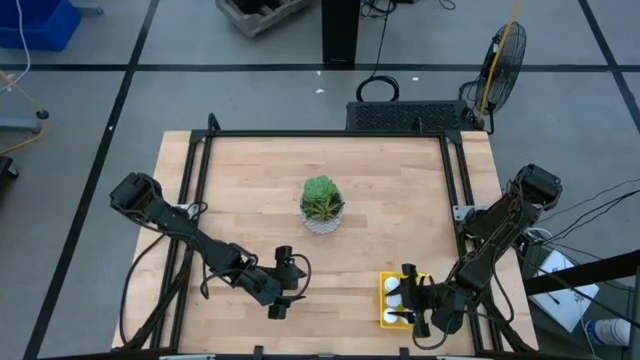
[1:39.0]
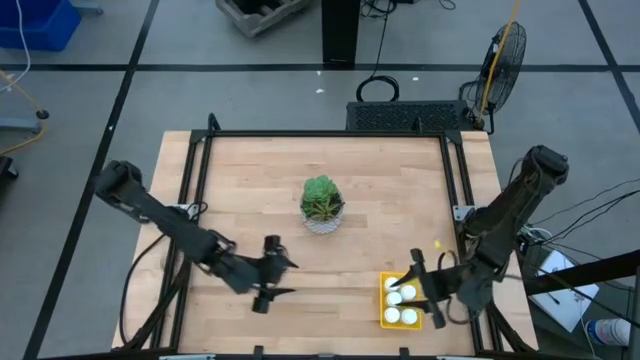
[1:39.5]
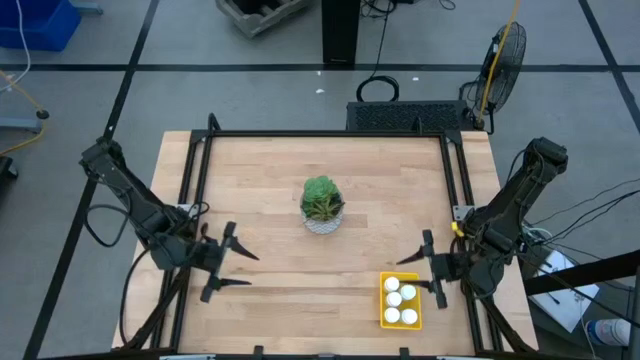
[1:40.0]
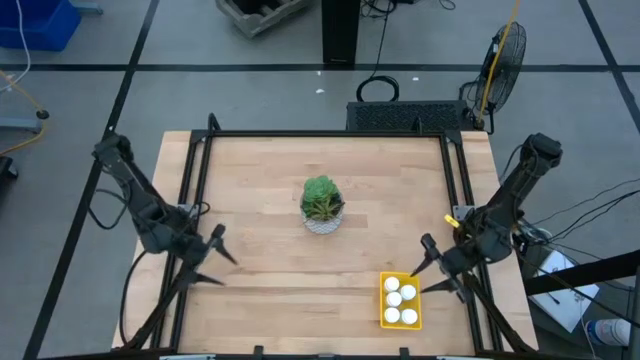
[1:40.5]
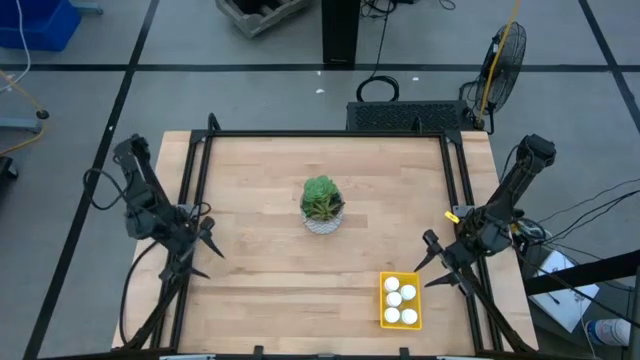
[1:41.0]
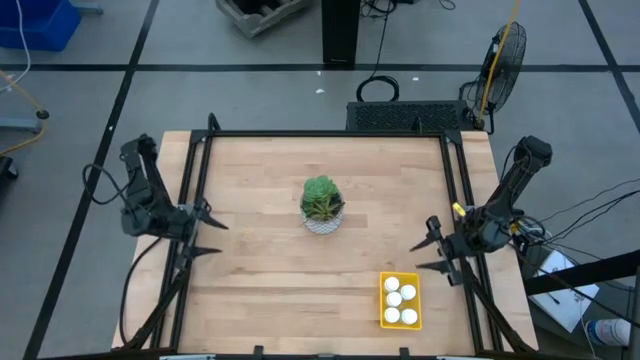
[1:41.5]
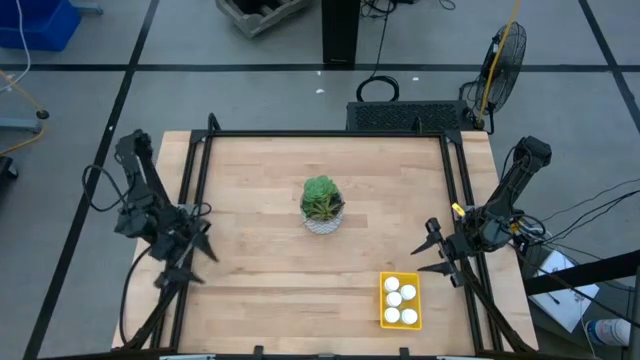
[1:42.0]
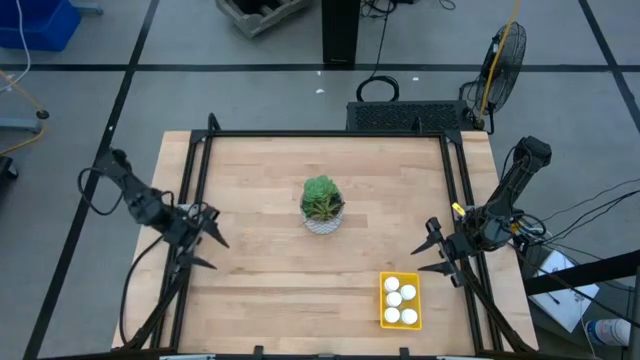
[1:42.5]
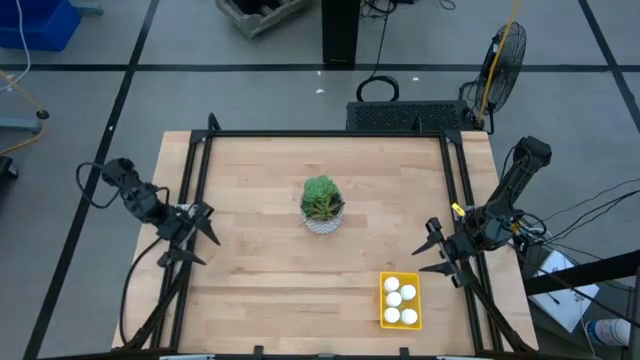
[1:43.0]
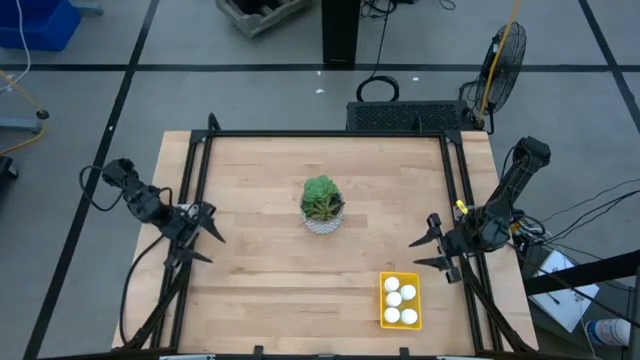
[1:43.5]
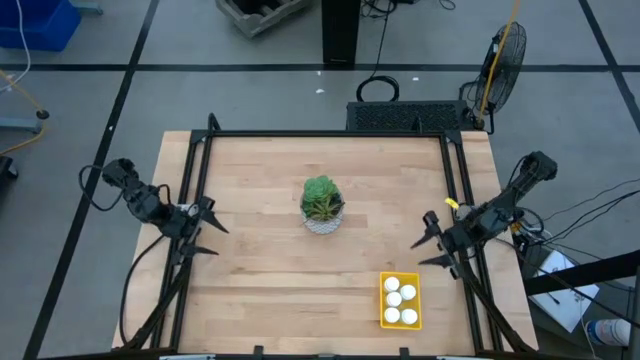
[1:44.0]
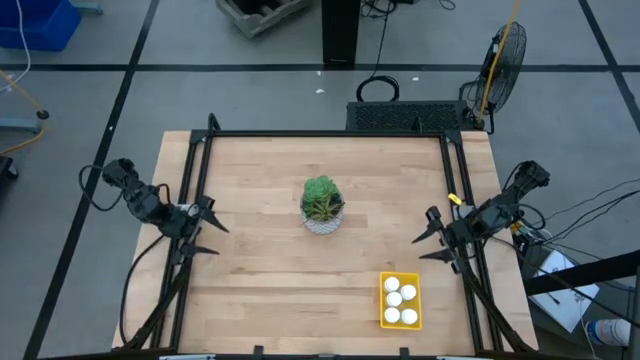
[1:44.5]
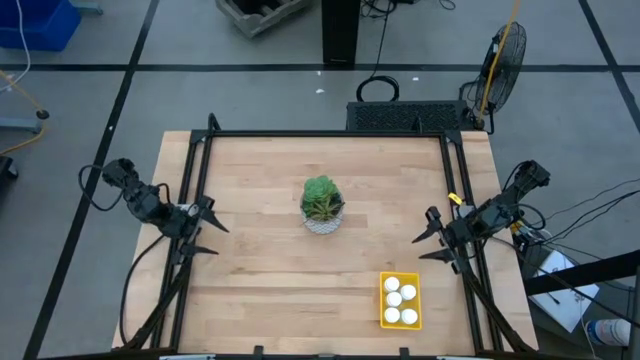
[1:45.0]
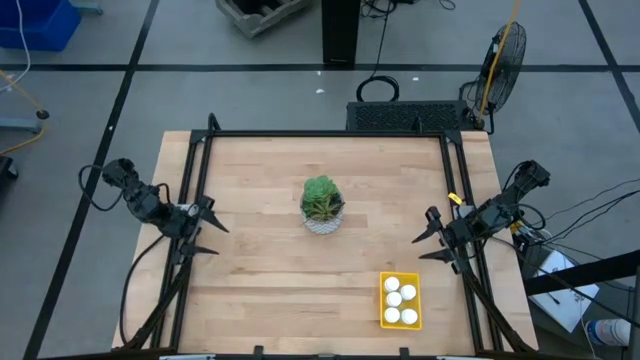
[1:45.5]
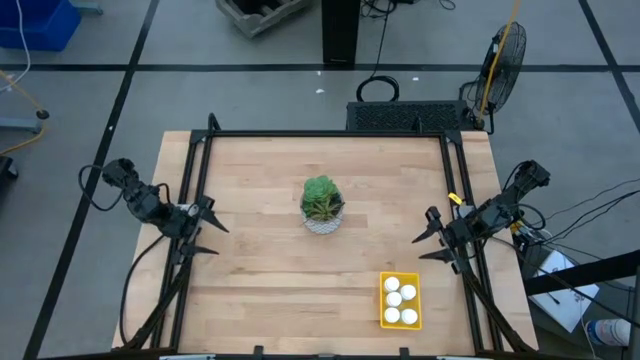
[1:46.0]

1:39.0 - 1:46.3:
Task: Pick and place pill bottles into a basket
Return to Home Position

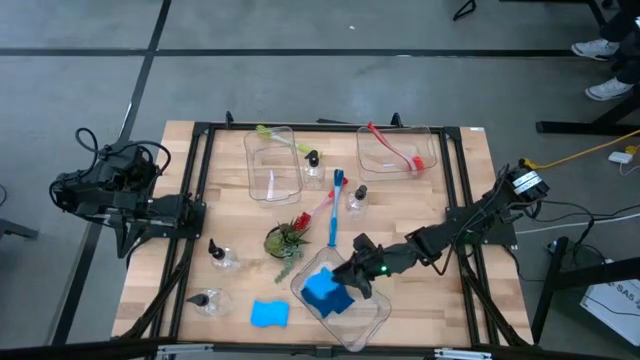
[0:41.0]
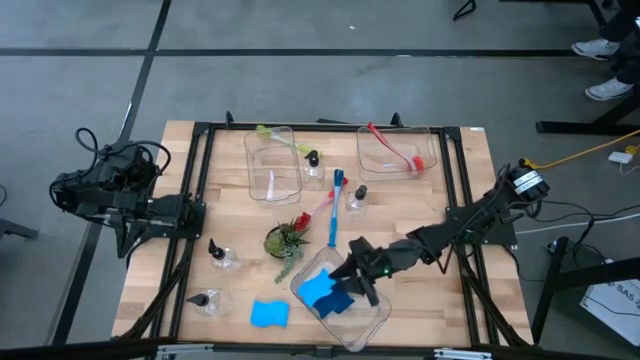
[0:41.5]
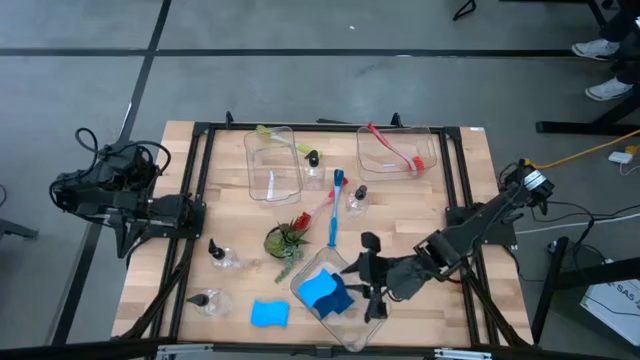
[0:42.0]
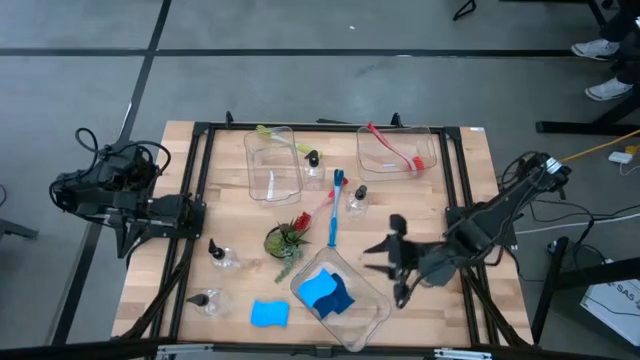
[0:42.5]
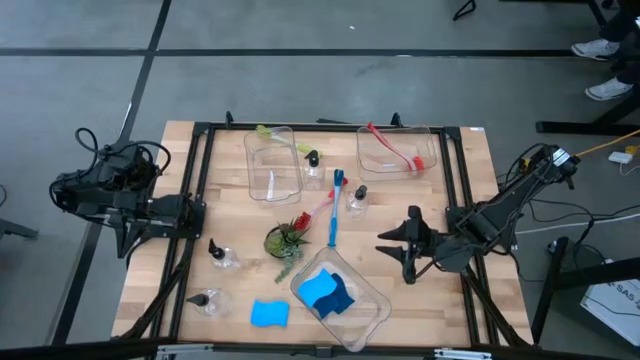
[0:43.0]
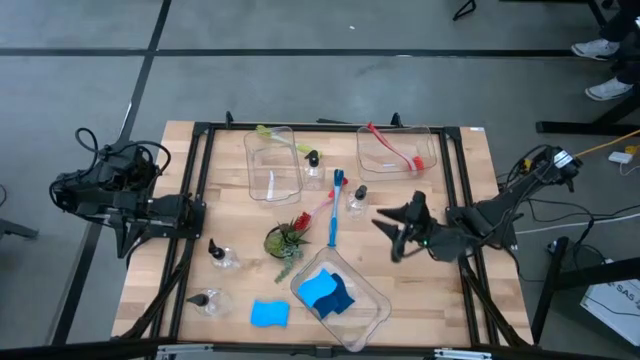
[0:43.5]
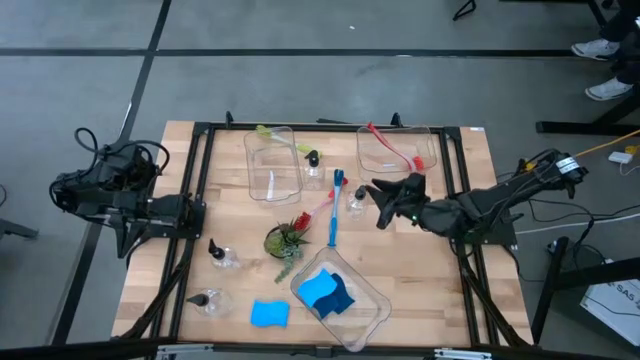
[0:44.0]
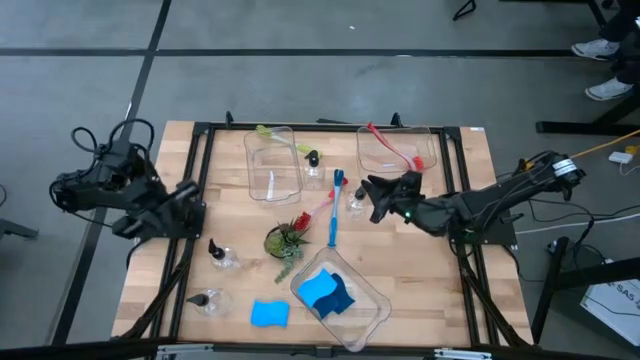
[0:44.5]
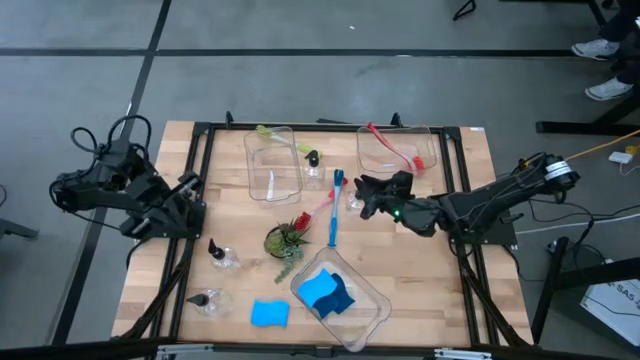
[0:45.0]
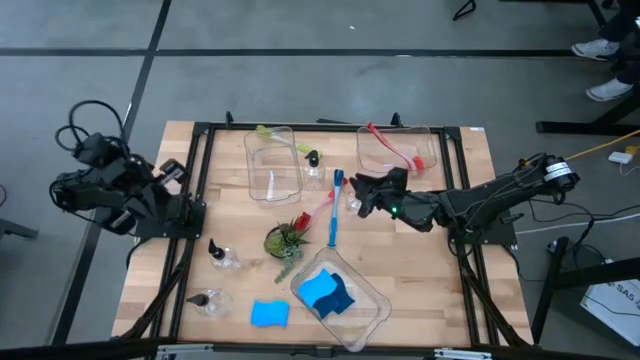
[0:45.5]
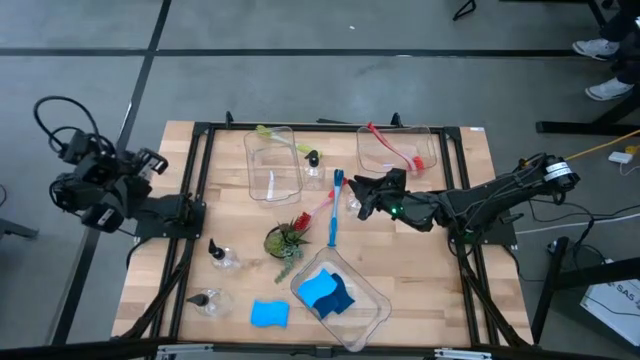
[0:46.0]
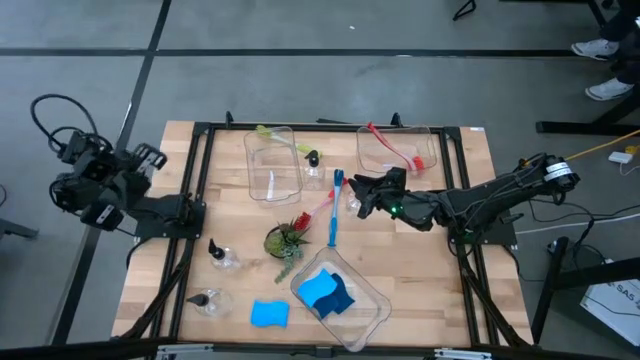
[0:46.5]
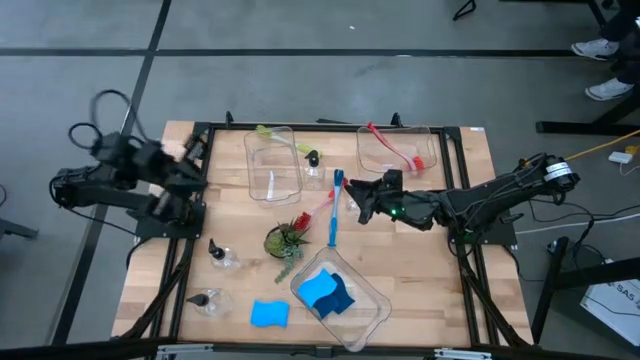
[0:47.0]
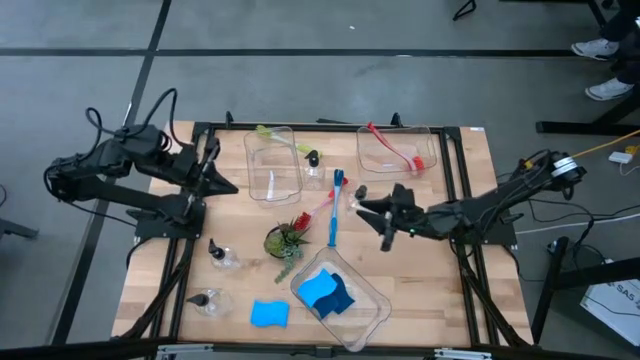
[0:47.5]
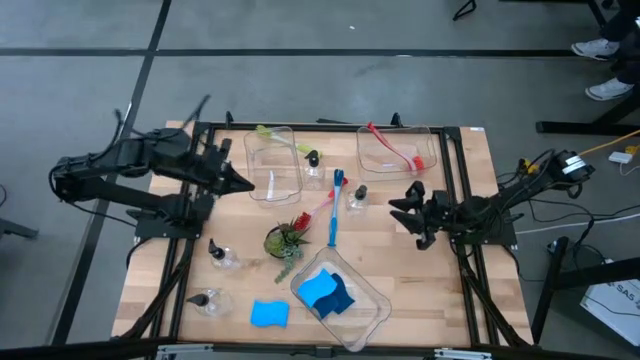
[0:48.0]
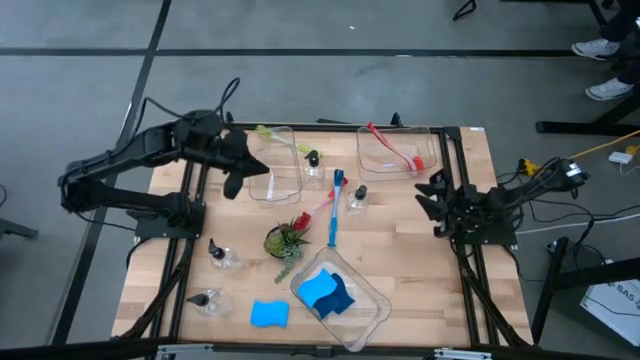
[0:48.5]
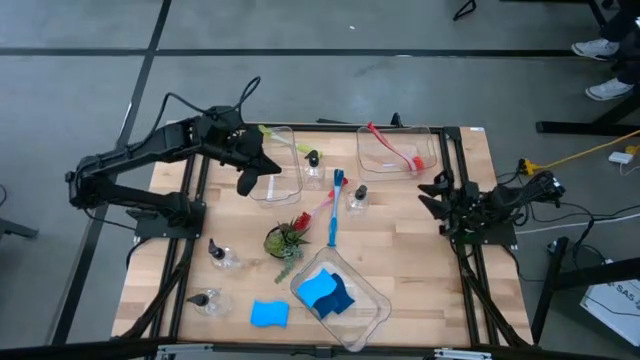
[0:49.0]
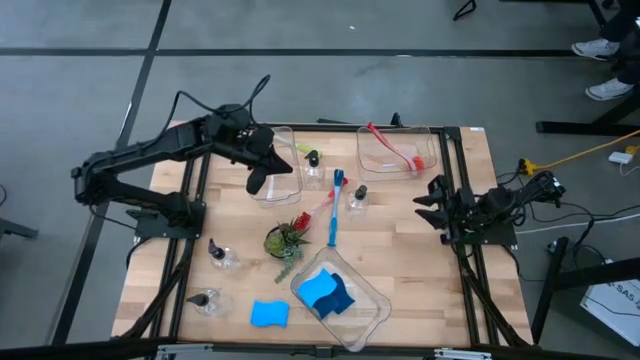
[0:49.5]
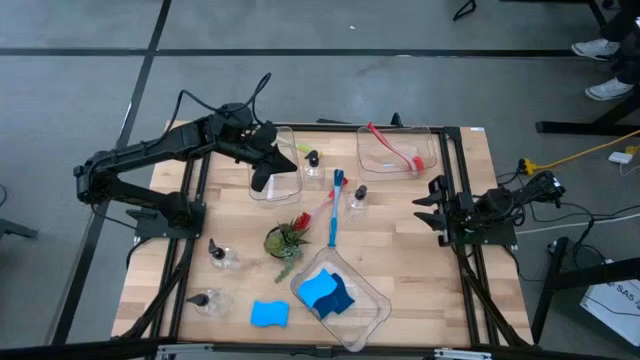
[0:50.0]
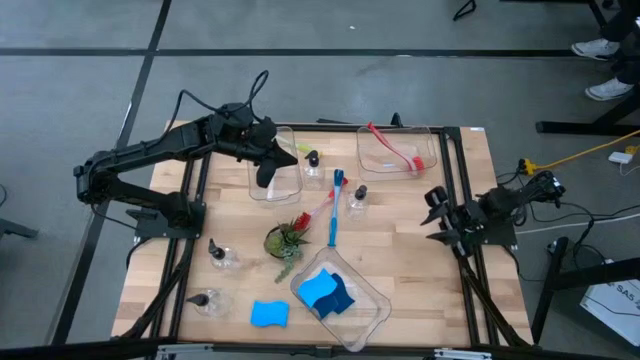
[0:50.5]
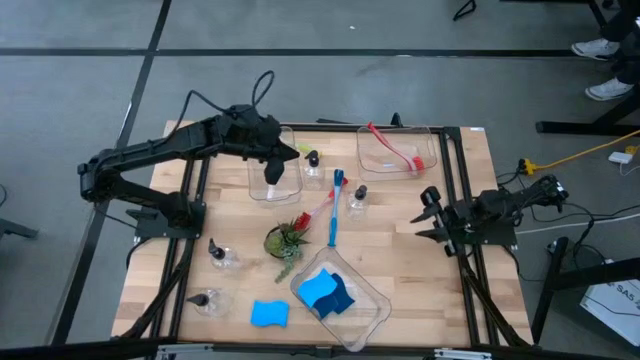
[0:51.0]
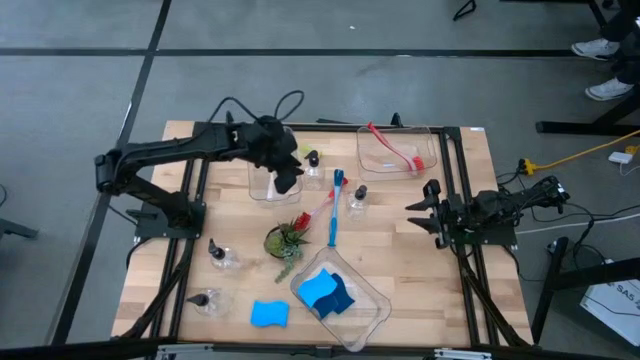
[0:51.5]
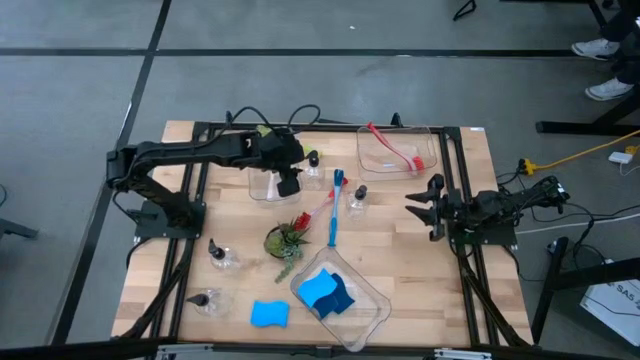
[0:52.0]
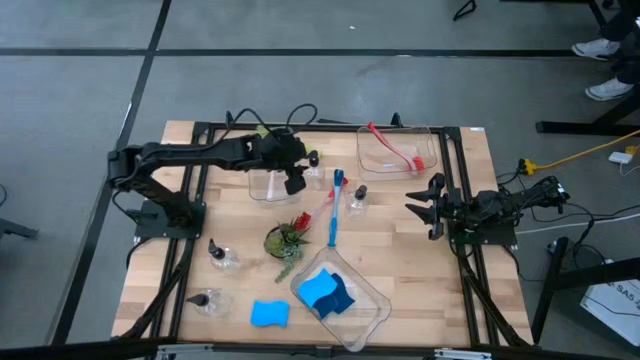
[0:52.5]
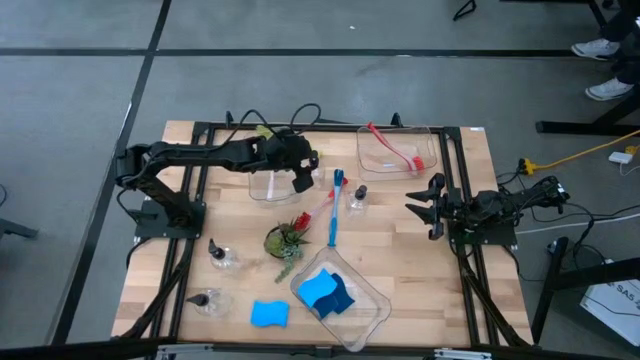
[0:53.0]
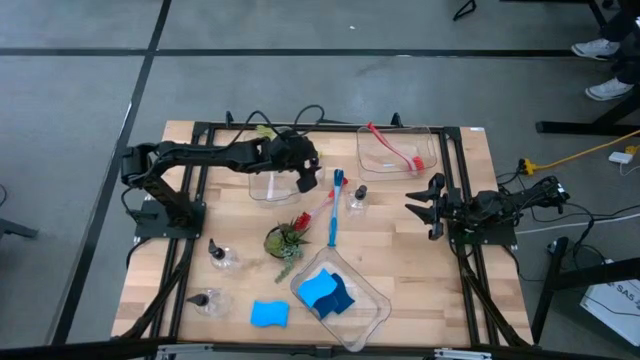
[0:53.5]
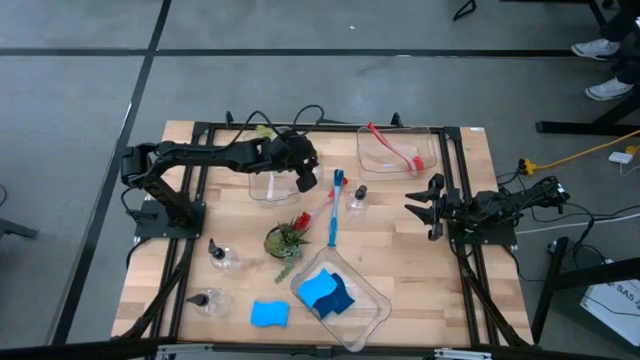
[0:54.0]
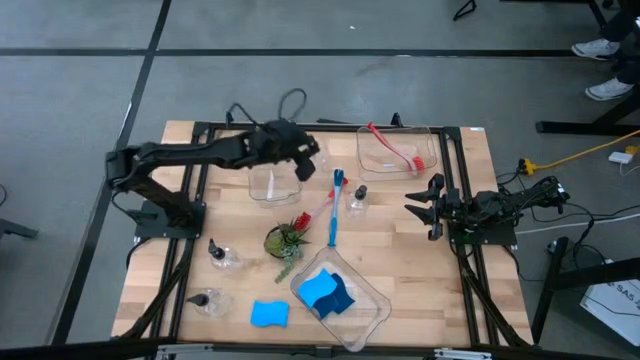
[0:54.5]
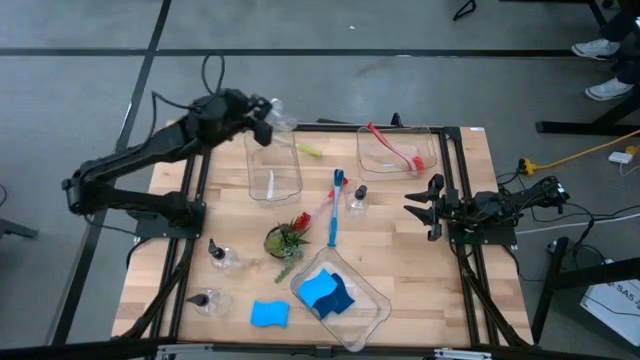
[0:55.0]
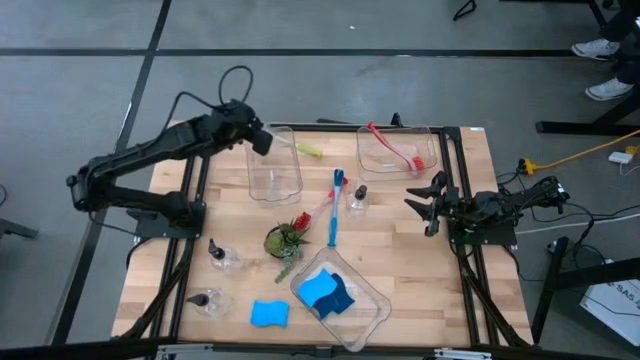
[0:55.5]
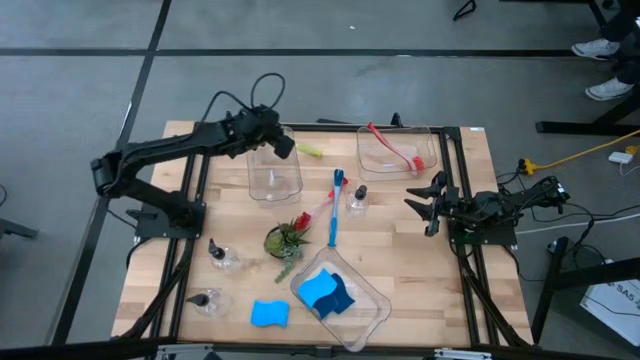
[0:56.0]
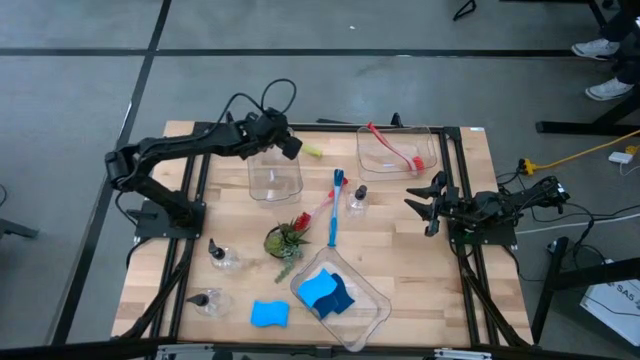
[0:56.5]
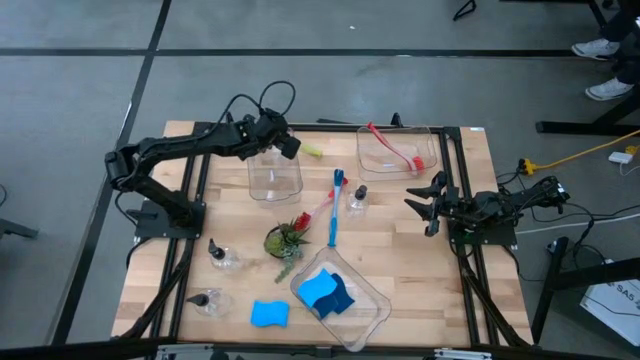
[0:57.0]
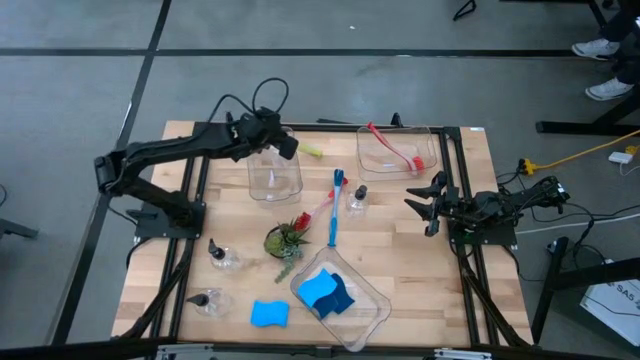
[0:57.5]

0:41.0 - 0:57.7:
Task: Pick & Place Kitchen Sink Supplies
Put the transparent soap dispenser into the top left transparent bin
